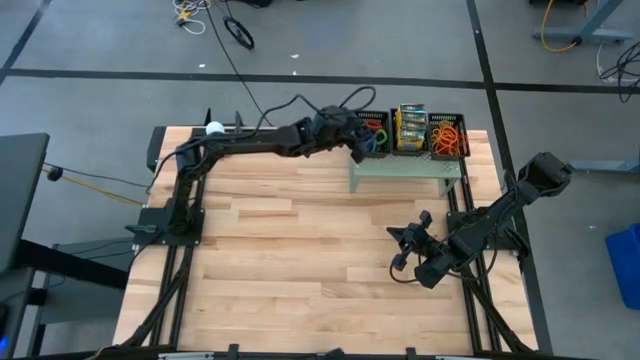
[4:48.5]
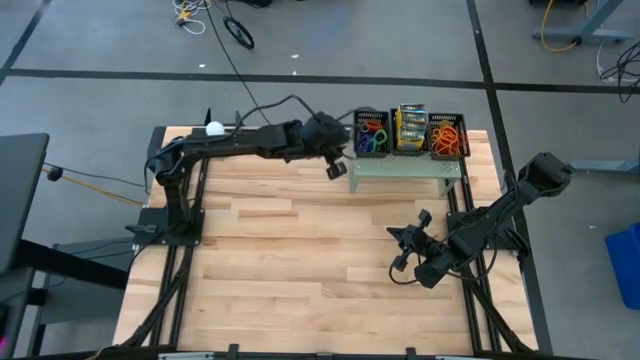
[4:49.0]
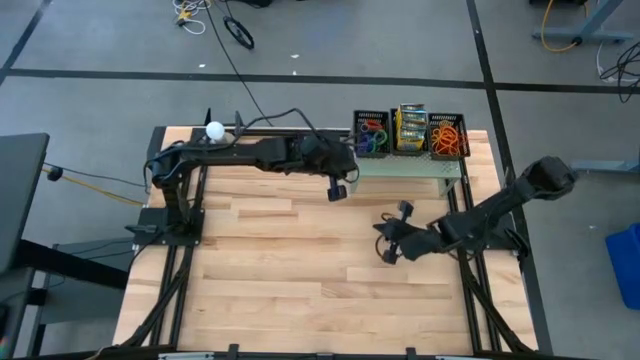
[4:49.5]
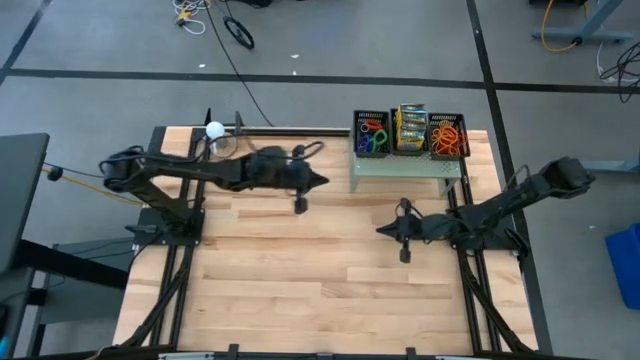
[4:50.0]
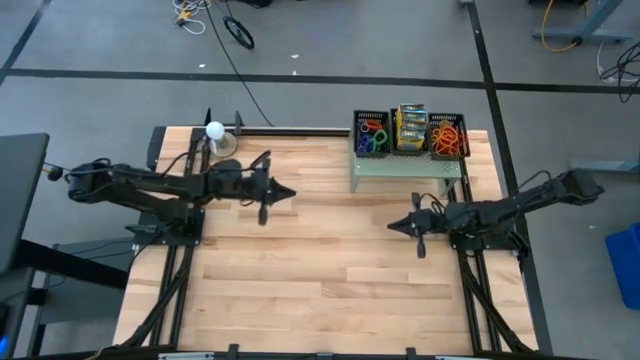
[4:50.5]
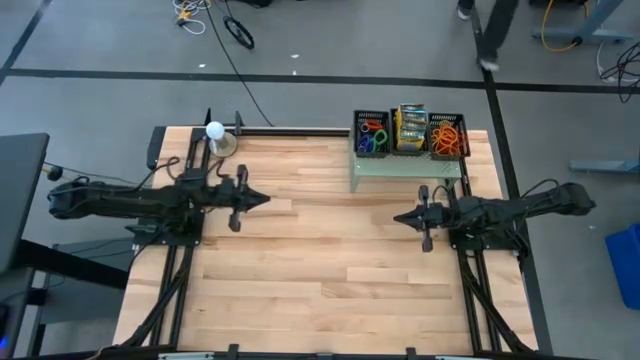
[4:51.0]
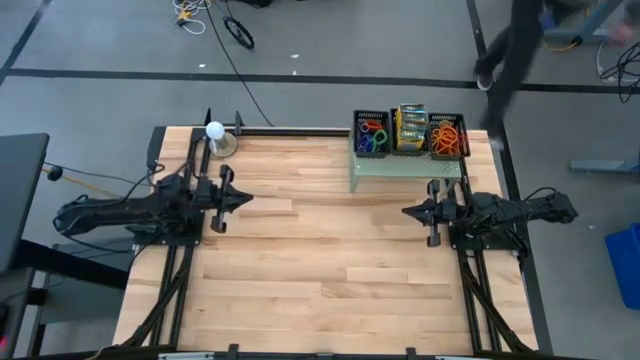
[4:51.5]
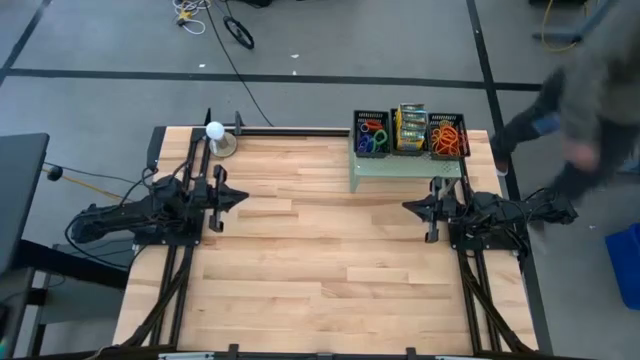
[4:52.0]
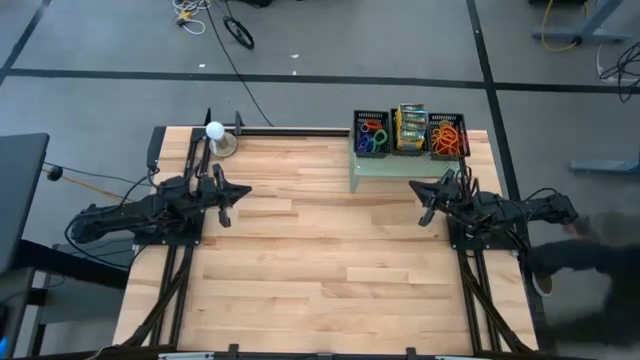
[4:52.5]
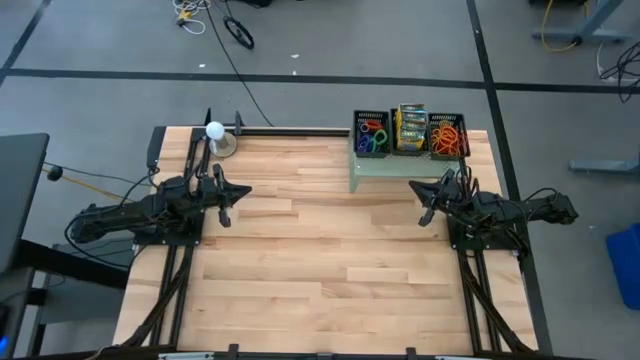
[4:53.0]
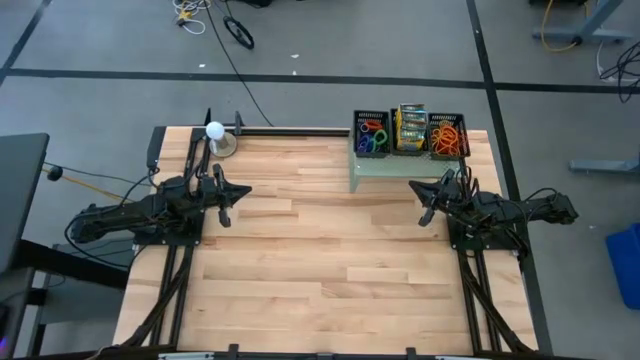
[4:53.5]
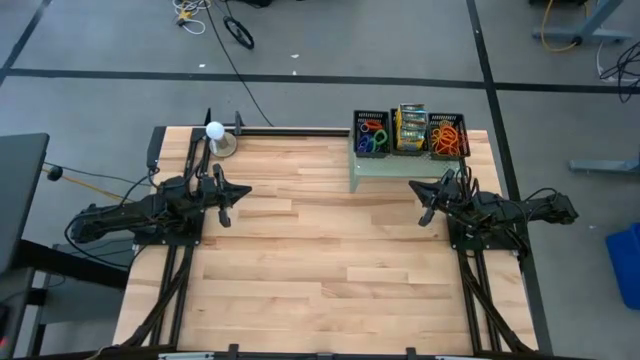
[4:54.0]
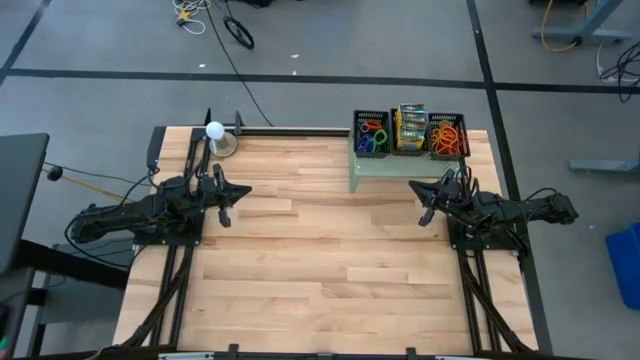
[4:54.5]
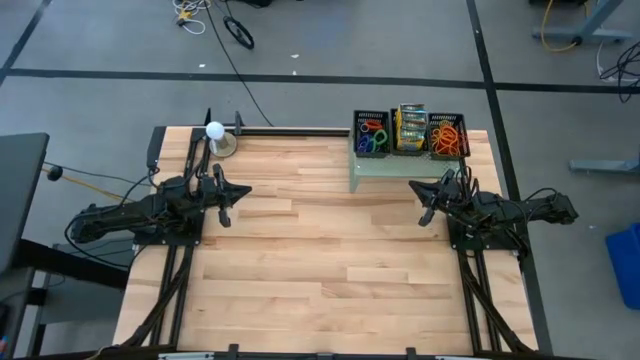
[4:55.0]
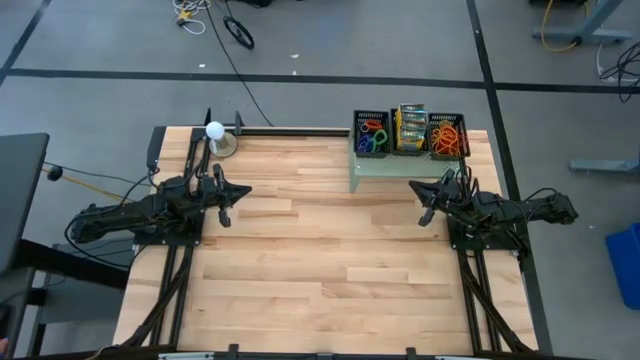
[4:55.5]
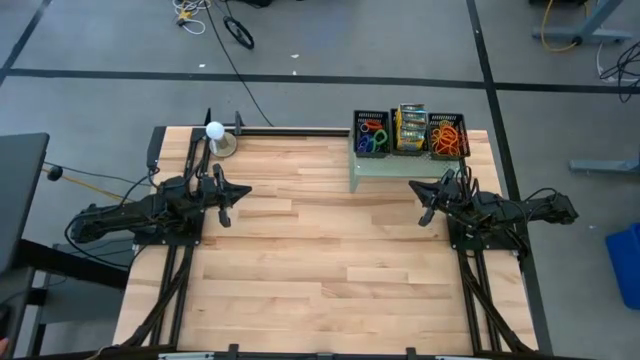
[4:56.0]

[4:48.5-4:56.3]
Task: Pick & Place Office Desk Supplies
Return to Home Position

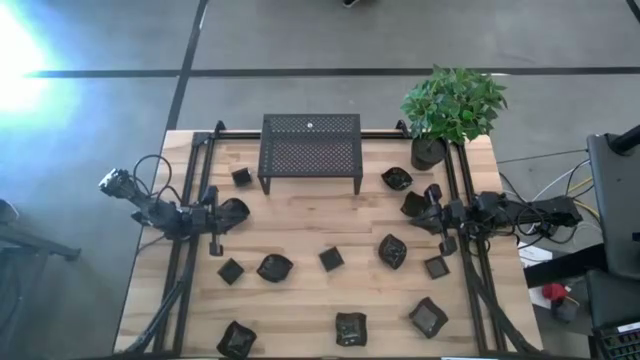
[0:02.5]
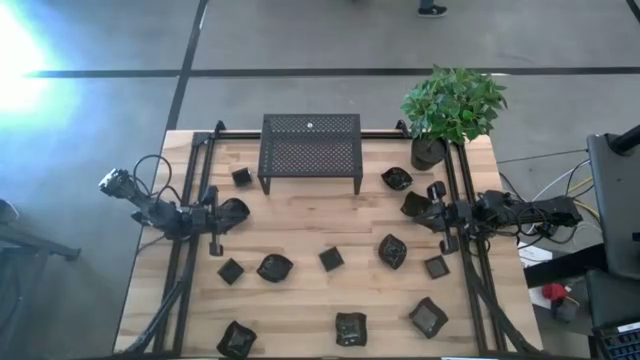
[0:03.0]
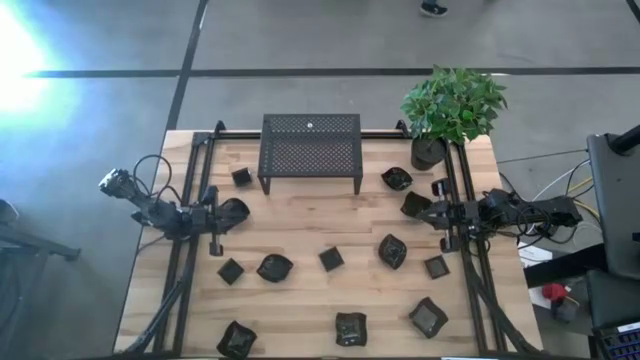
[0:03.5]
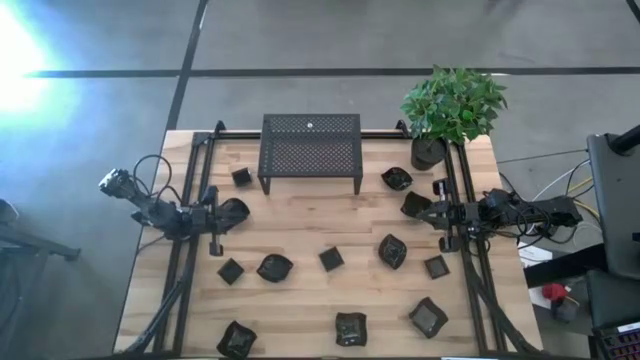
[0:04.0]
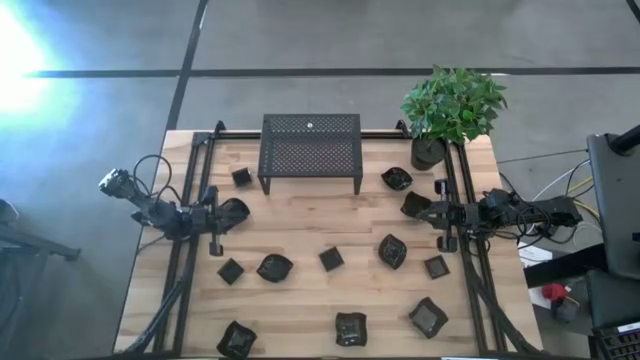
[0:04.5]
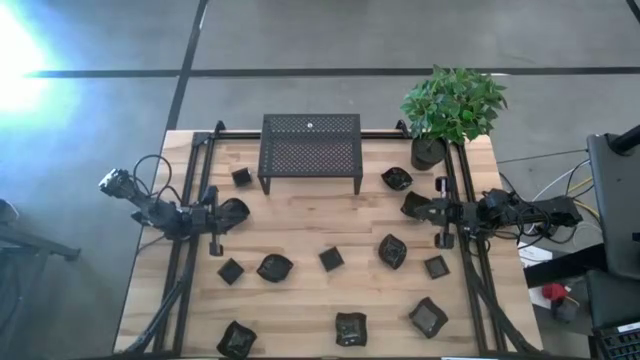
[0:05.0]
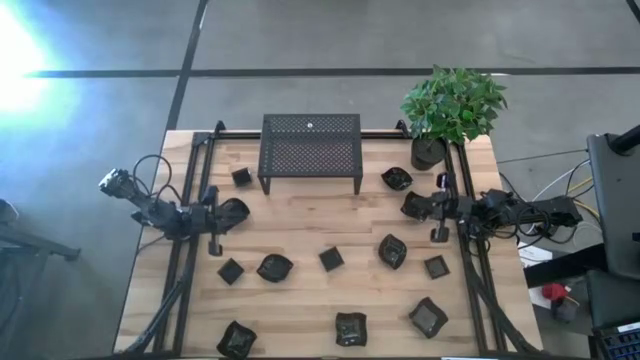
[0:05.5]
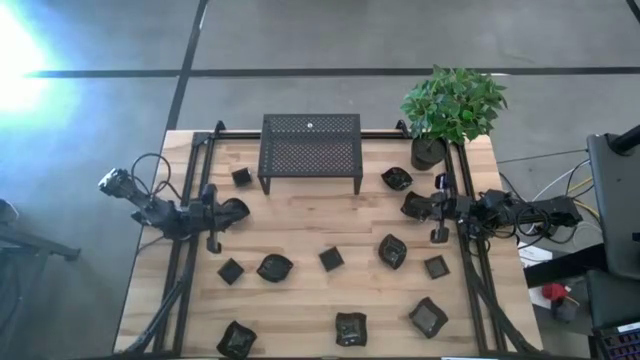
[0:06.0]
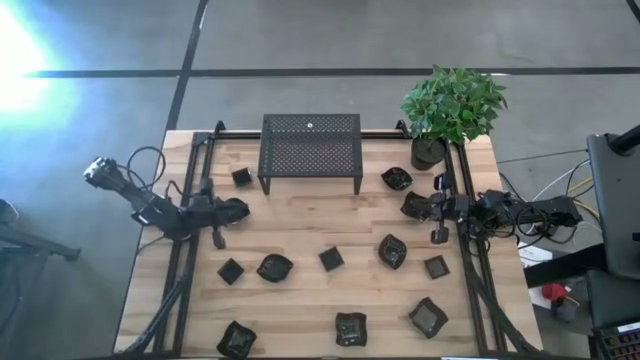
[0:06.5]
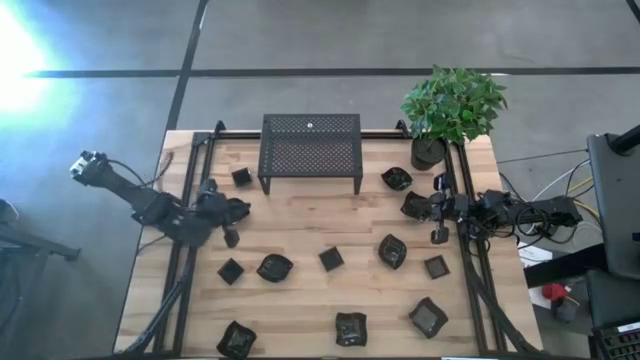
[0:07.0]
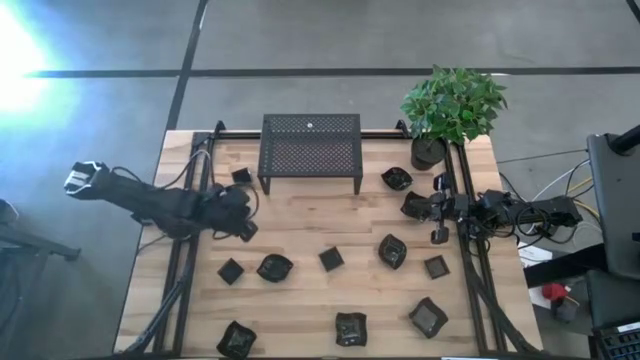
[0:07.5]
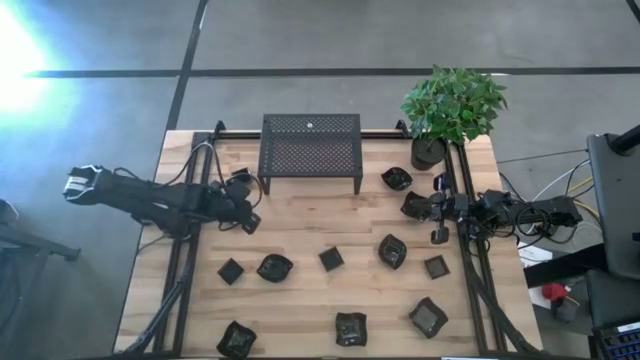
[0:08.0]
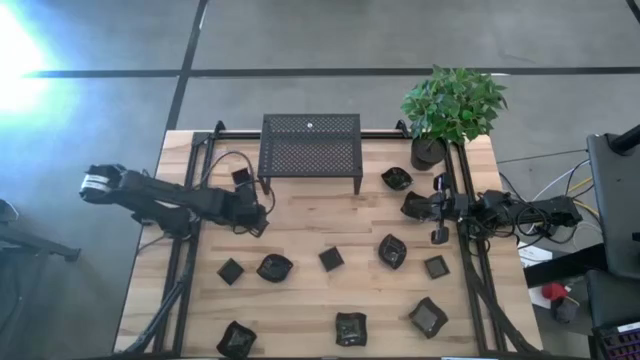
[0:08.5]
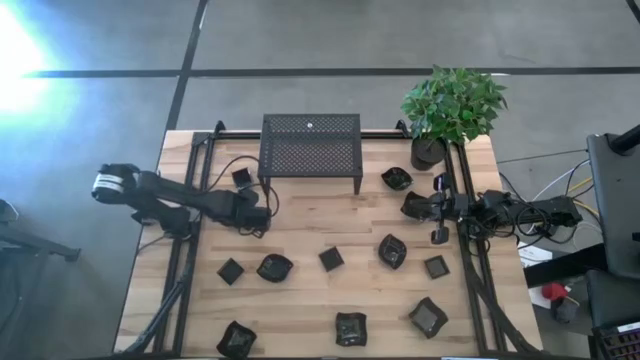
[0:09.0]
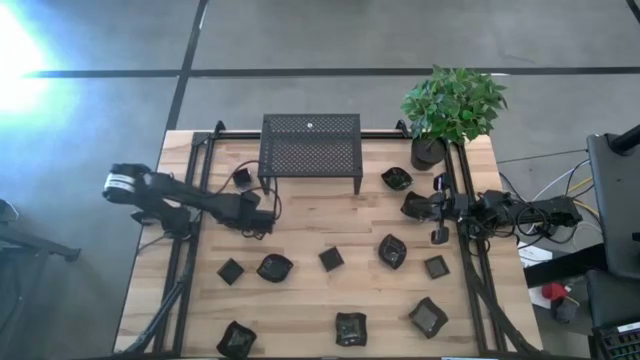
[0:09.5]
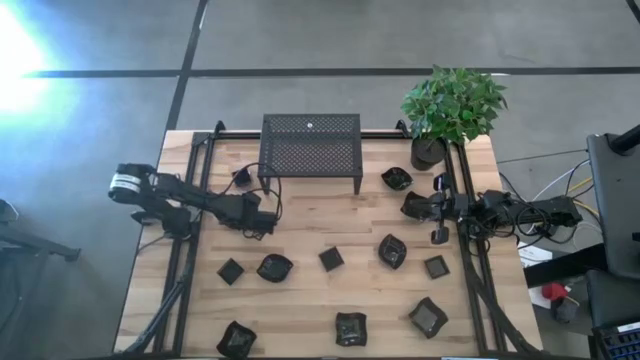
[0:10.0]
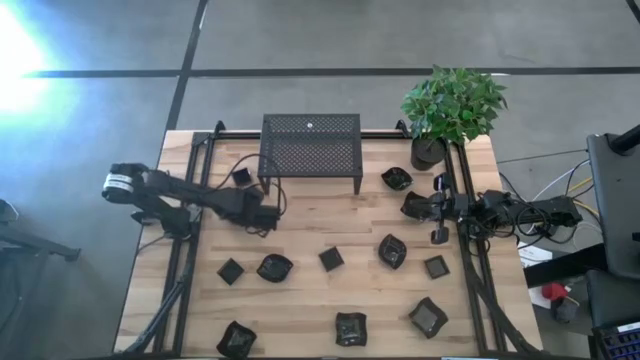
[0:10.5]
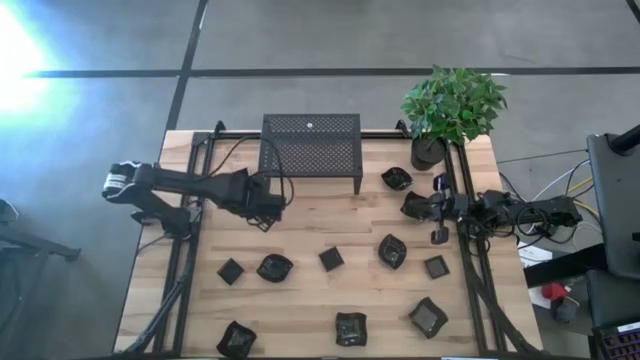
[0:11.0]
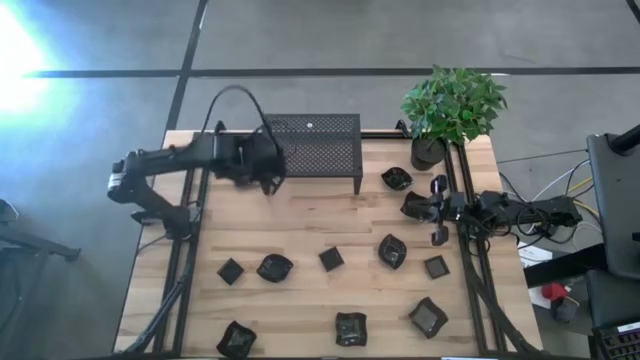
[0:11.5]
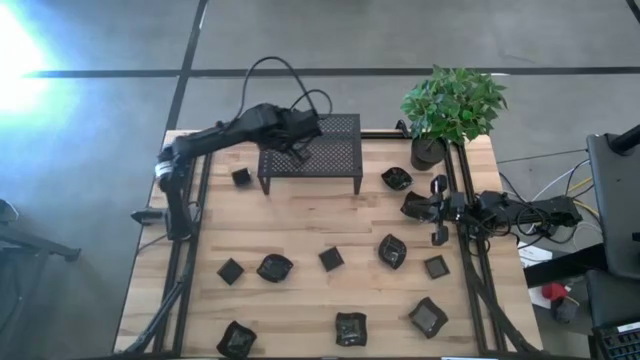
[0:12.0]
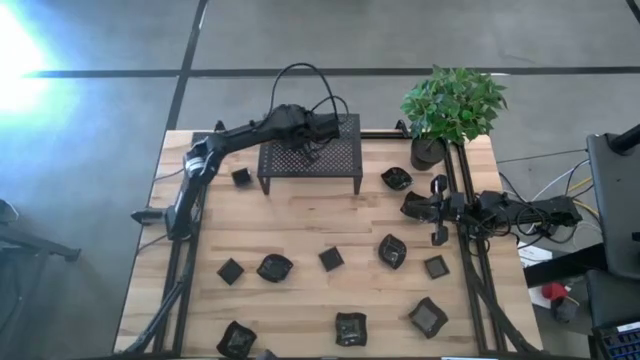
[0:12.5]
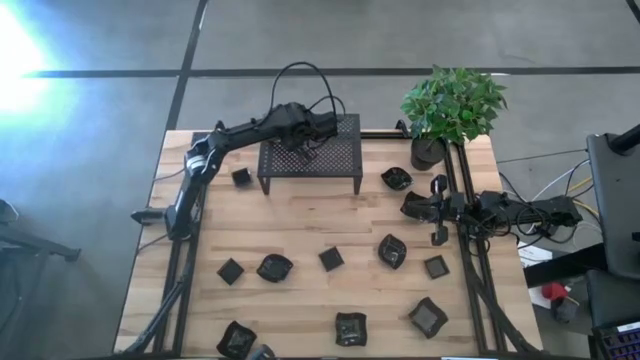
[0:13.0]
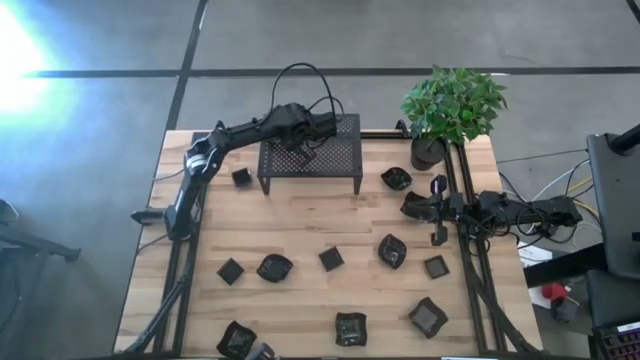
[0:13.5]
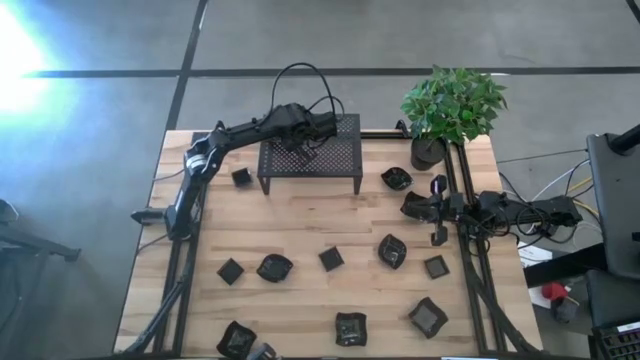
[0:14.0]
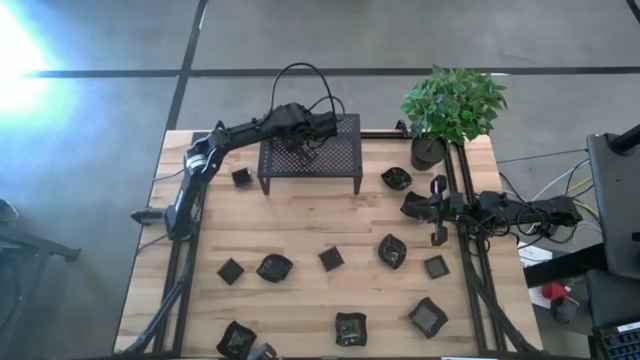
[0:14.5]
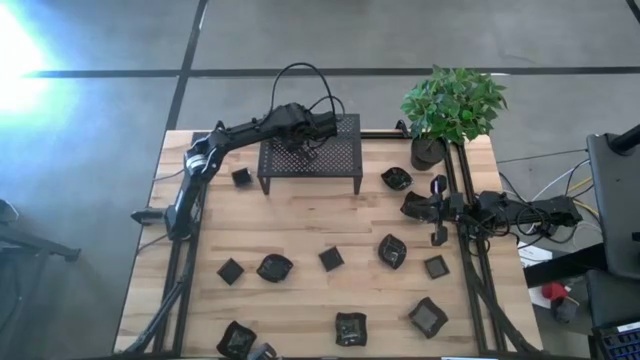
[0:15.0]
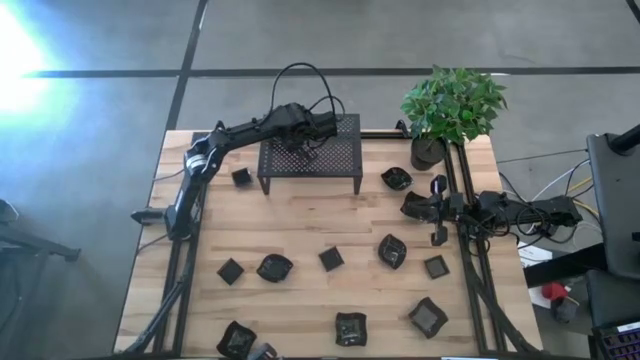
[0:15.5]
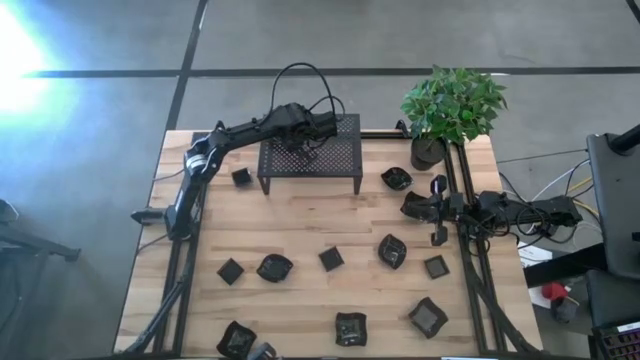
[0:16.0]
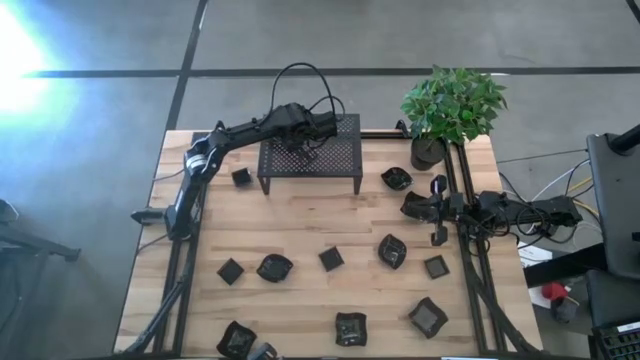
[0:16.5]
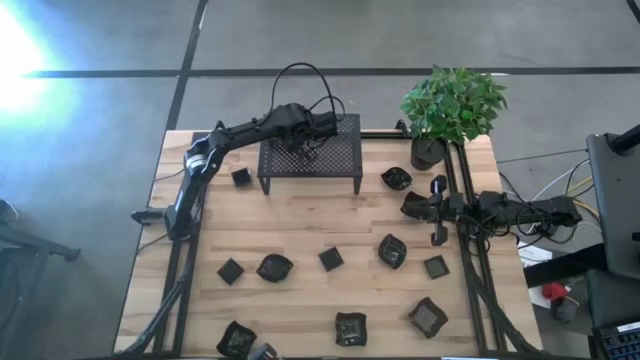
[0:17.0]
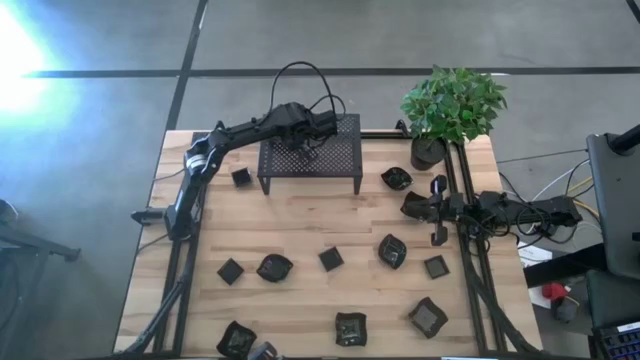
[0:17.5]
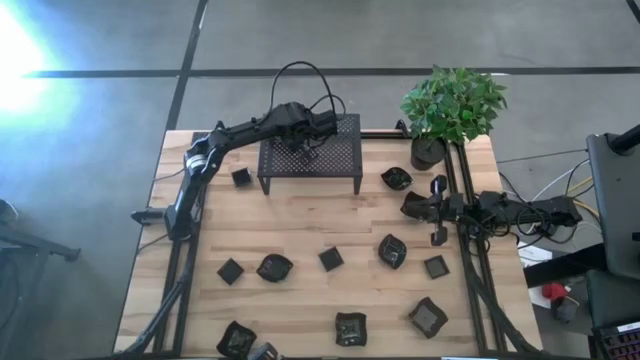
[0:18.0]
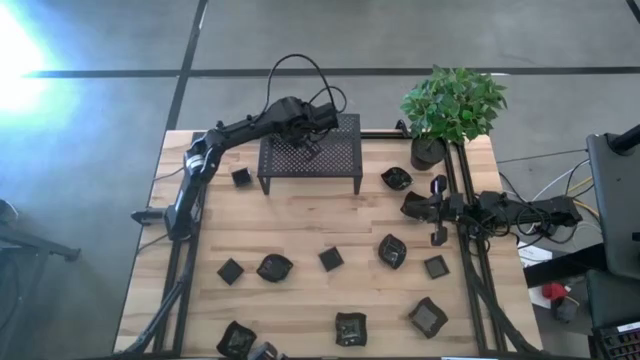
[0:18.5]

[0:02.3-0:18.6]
Task: Pick & Place Mini shaped plates
Put the leaf shaped plate on the shelf
